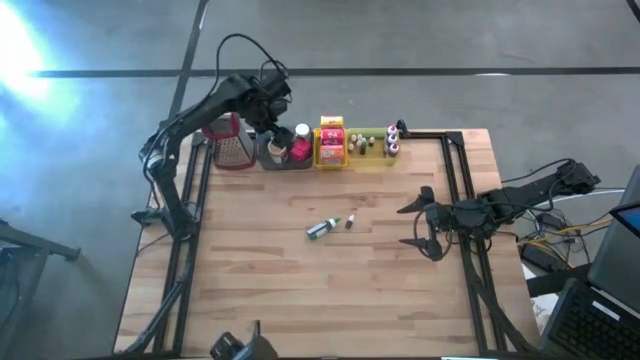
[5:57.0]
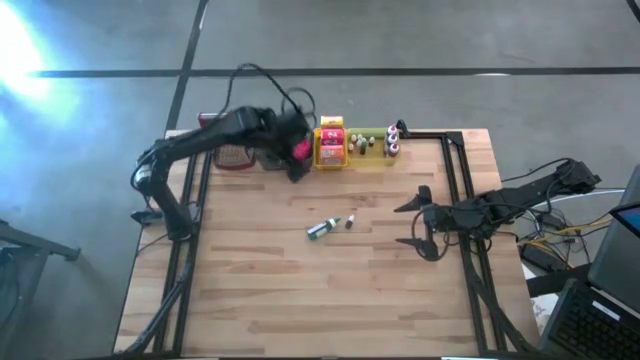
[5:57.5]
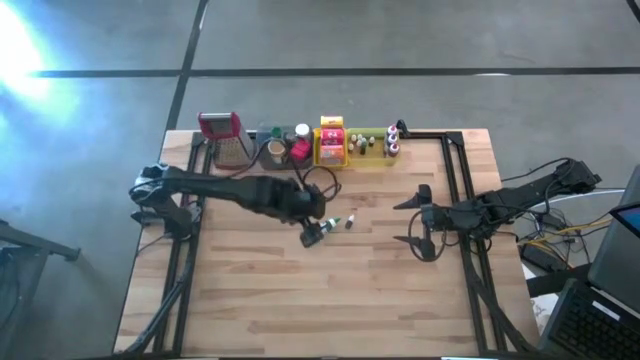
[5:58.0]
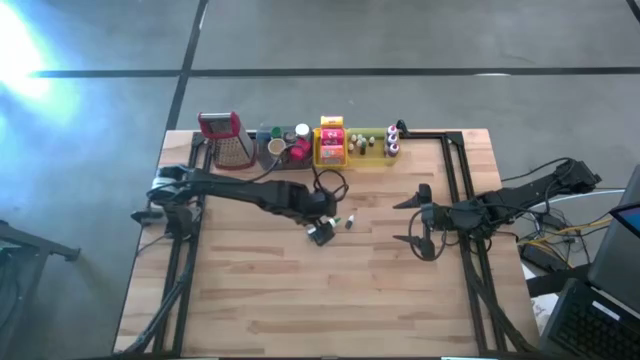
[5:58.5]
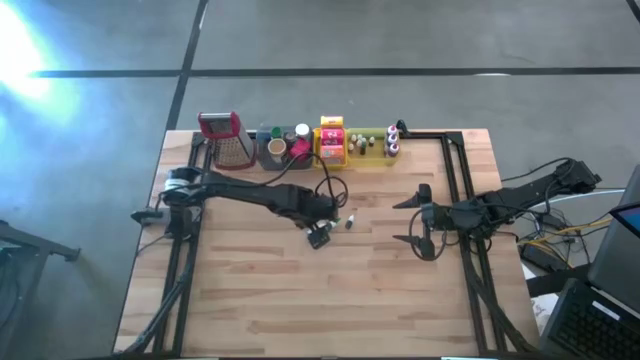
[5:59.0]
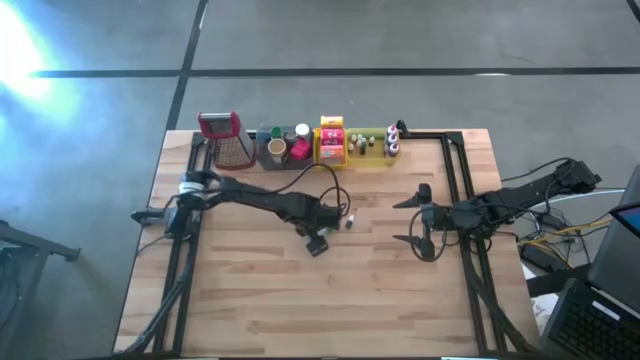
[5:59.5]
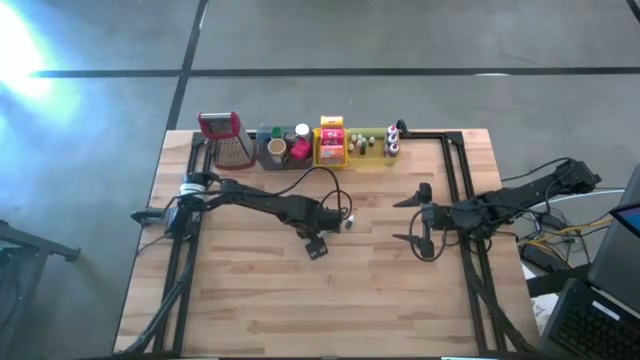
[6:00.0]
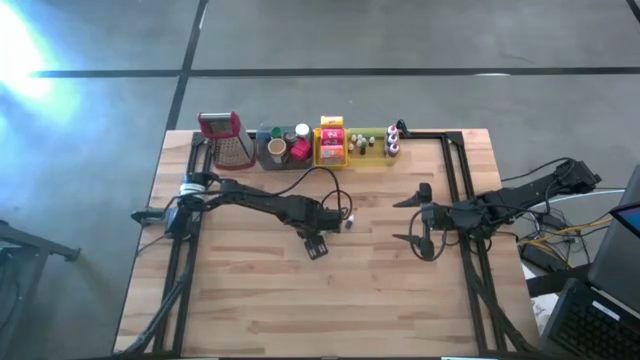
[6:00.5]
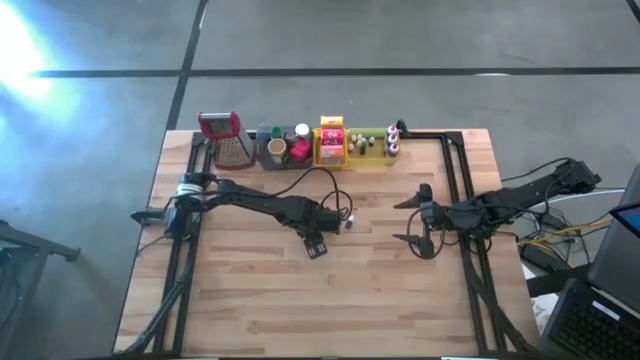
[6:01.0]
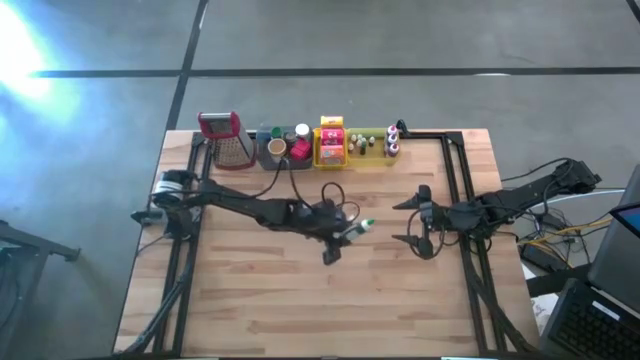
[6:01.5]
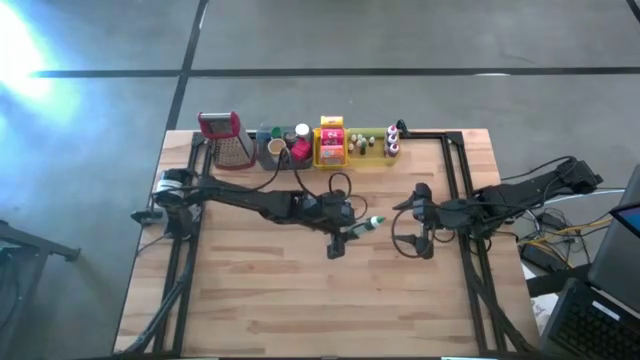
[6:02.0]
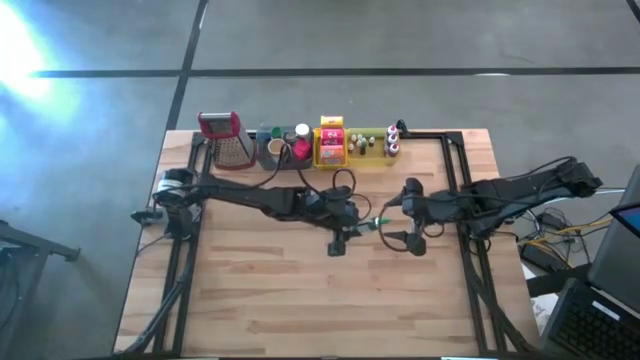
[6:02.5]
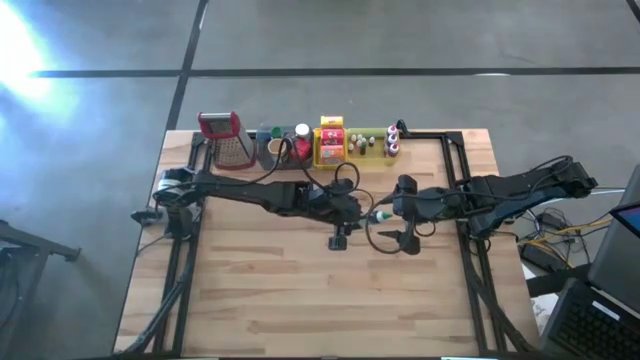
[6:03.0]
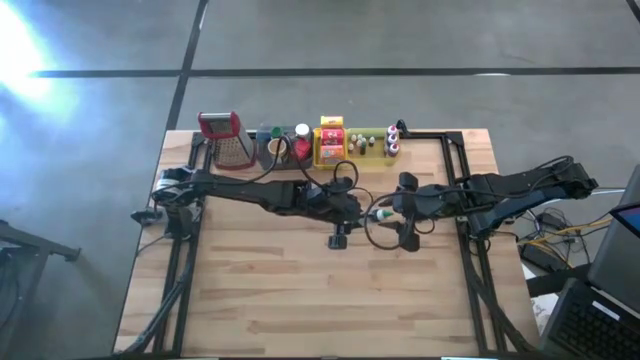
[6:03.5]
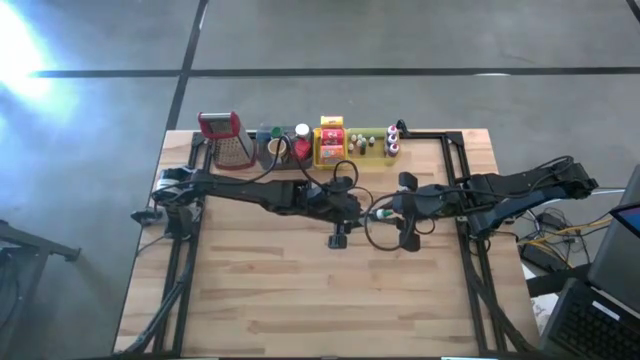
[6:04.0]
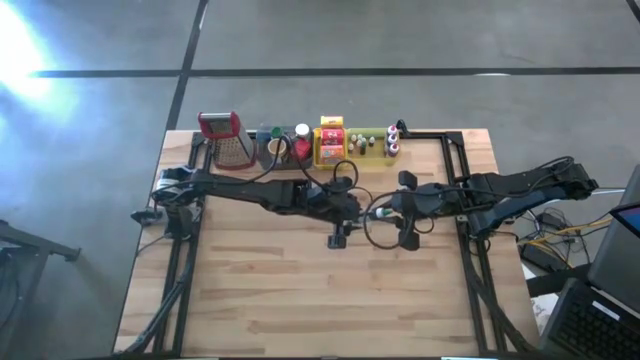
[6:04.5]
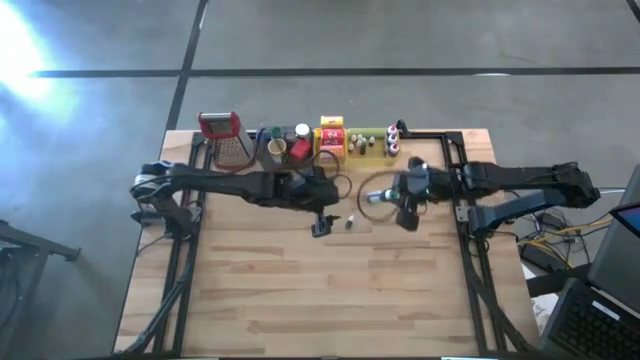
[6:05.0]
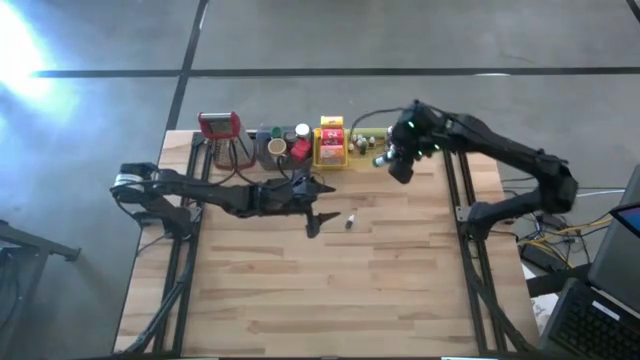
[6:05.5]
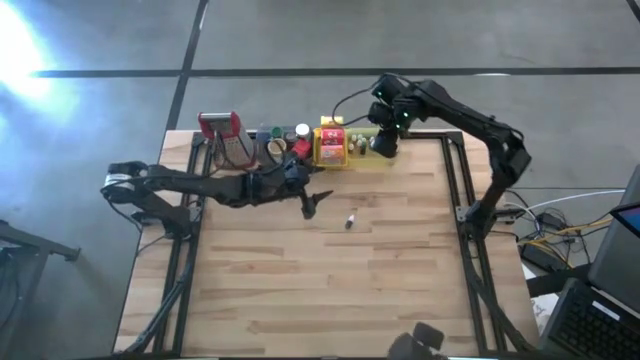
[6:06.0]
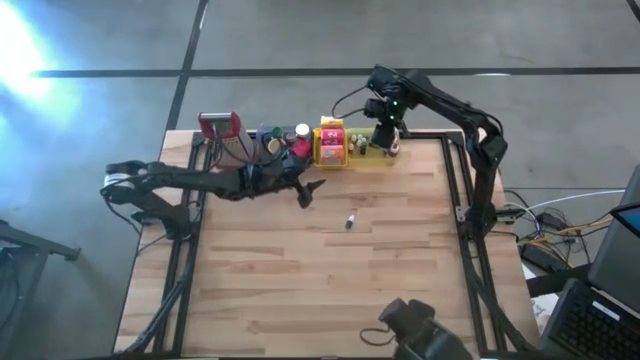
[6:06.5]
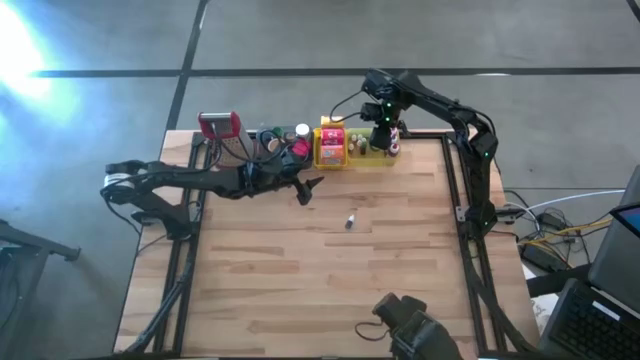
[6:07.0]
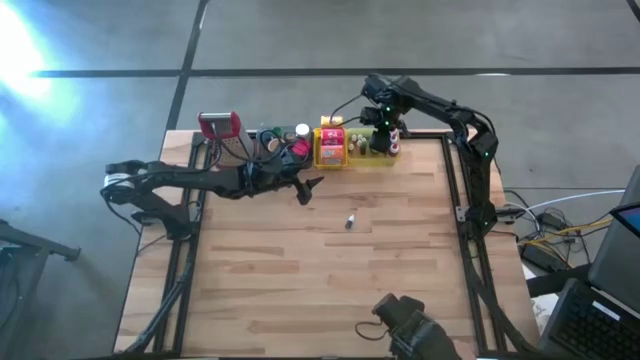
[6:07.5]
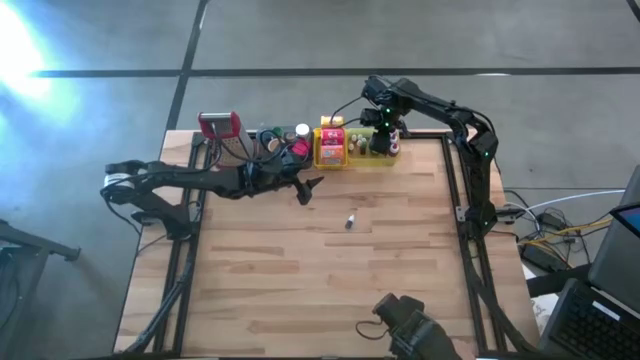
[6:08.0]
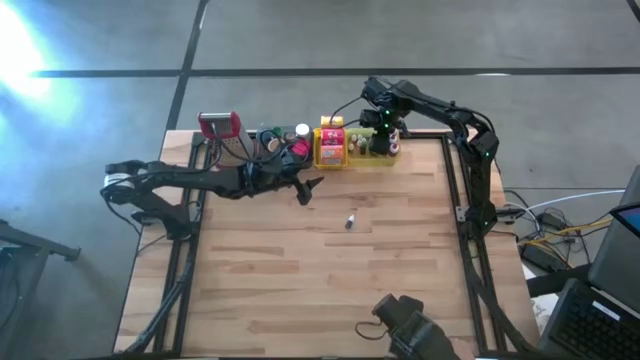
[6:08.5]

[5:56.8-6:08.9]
Task: Pick & Place Kitchen Items
Put the large green food coloring bottle into the light yellow bin

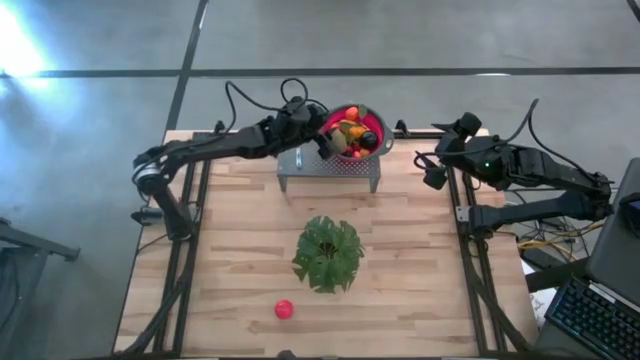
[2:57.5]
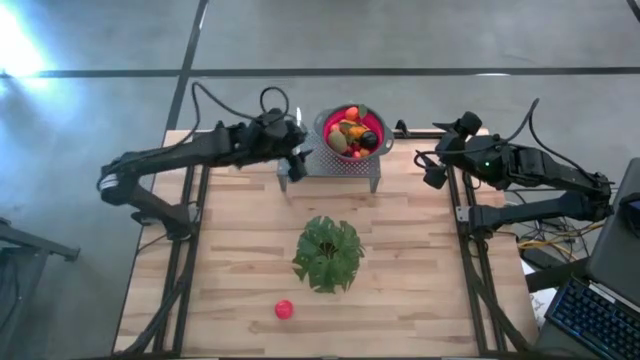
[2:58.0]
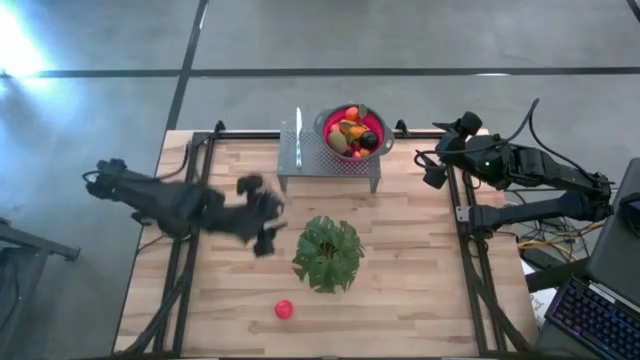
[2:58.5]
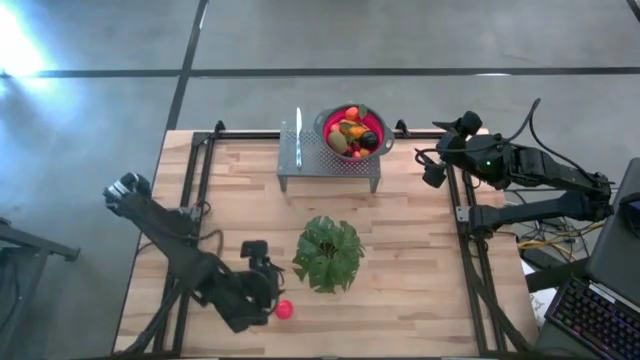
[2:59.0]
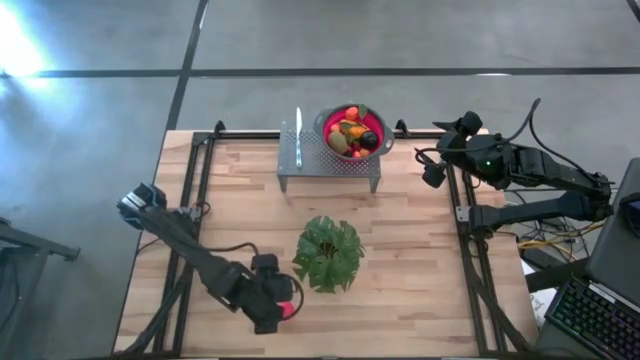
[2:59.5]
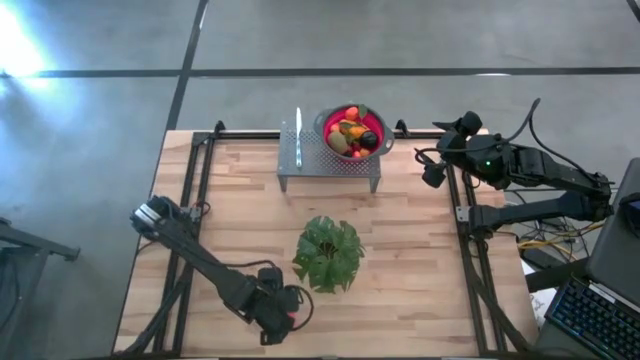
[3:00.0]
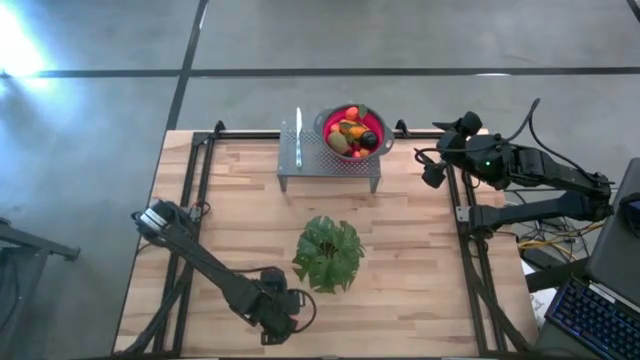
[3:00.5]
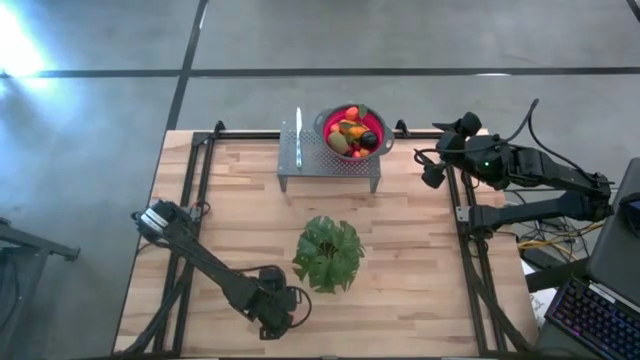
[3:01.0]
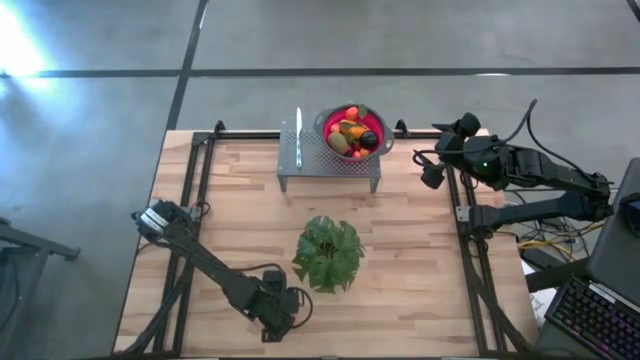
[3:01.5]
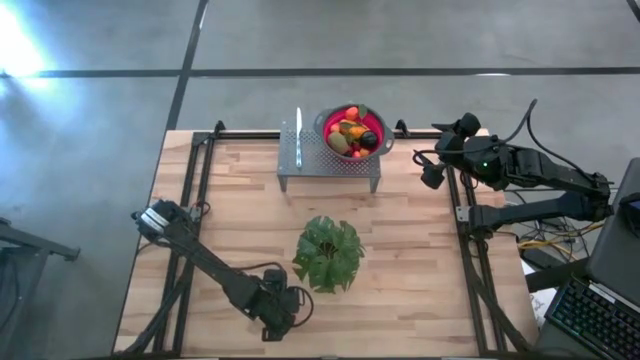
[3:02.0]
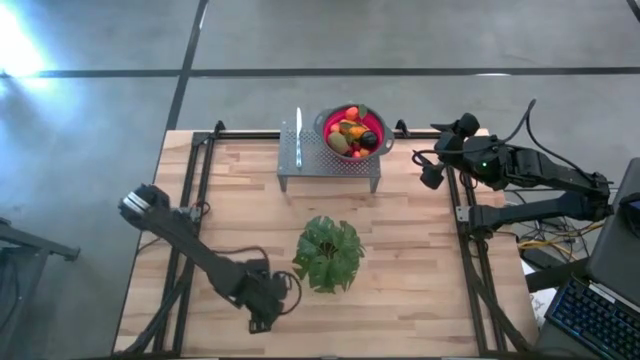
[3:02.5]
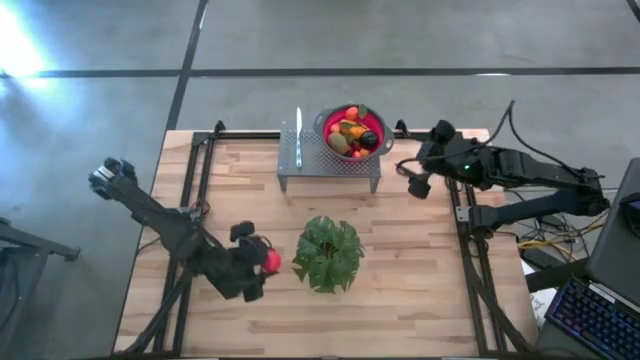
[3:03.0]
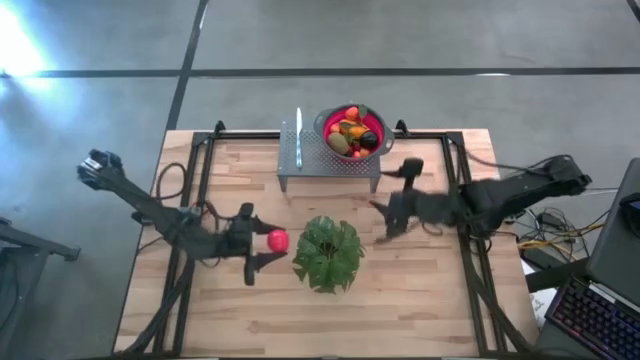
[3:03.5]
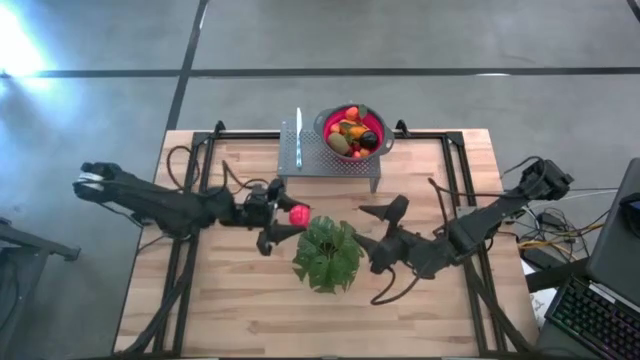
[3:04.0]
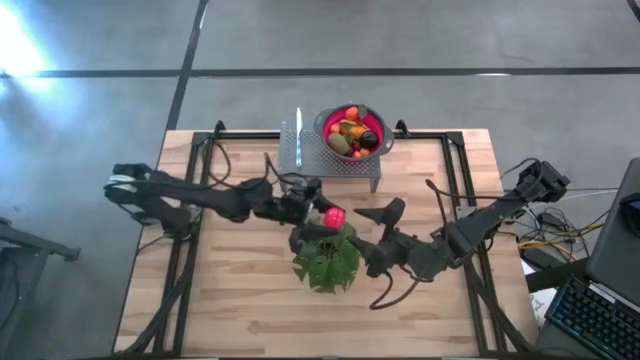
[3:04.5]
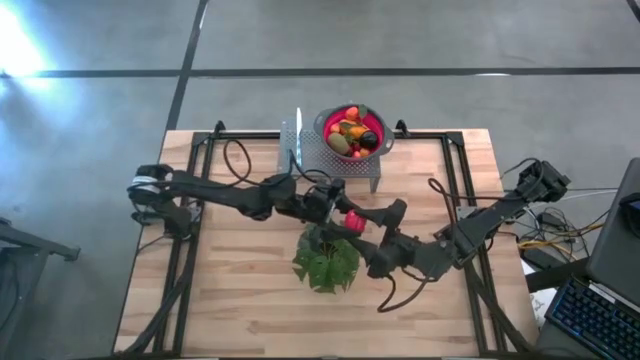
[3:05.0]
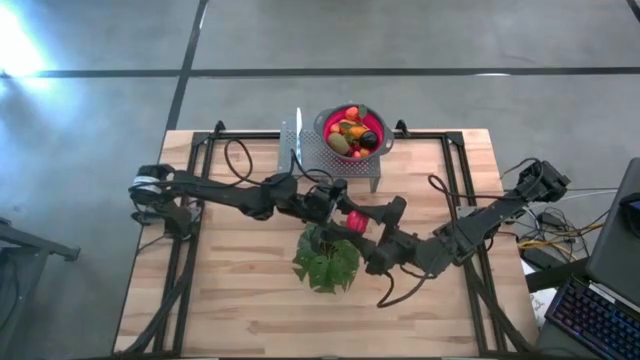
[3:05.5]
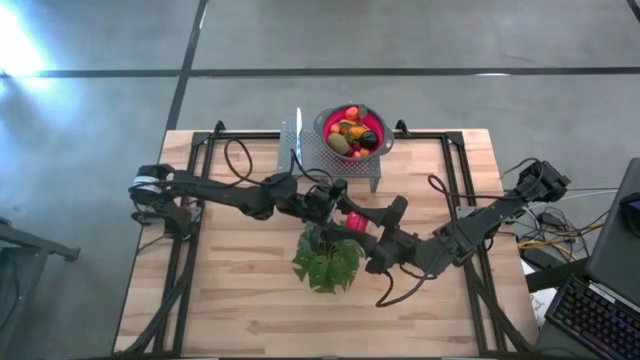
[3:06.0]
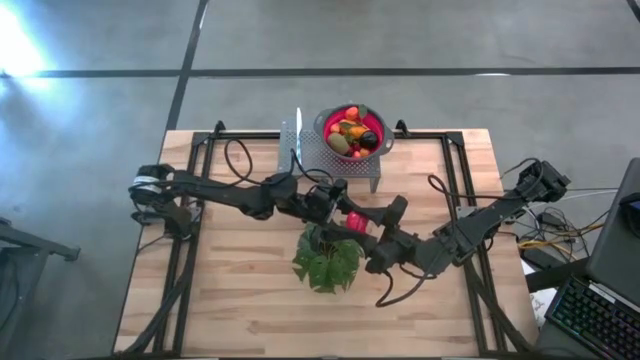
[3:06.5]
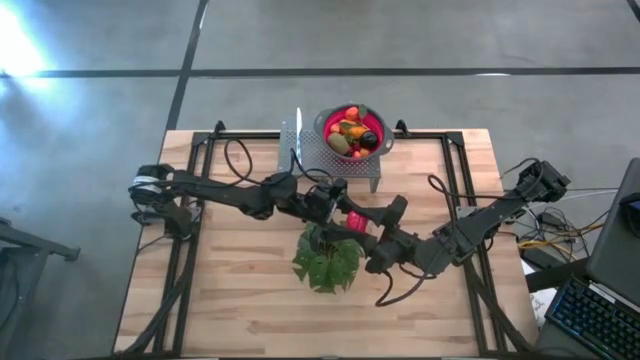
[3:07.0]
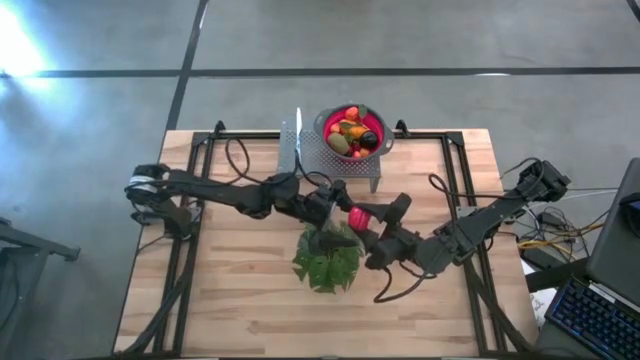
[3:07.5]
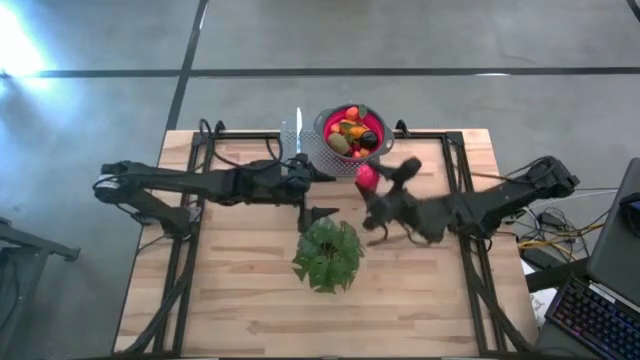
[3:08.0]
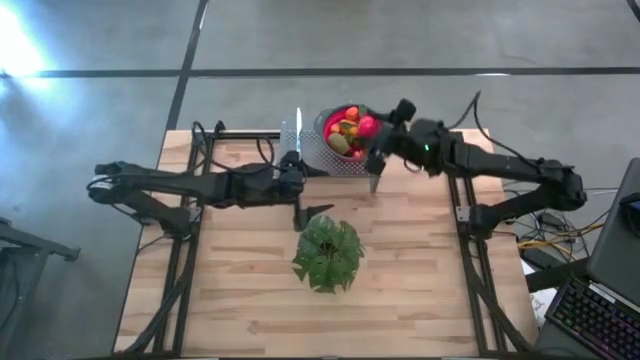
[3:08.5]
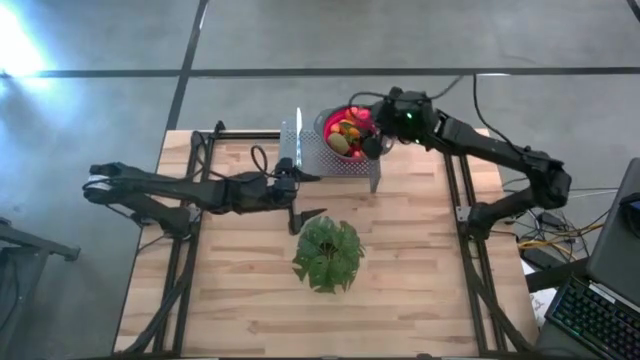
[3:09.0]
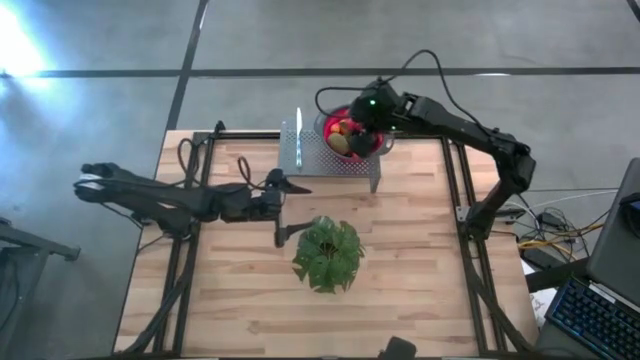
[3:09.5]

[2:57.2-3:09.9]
Task: Pick & Place Fruit
Put the tomato into the red strainer bowl on the shelf
